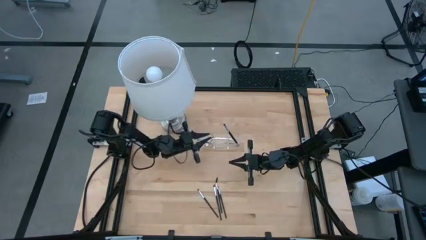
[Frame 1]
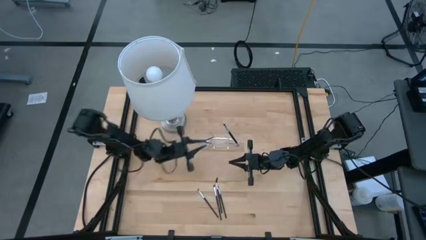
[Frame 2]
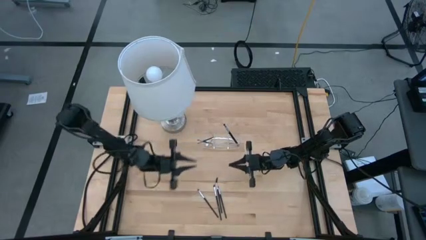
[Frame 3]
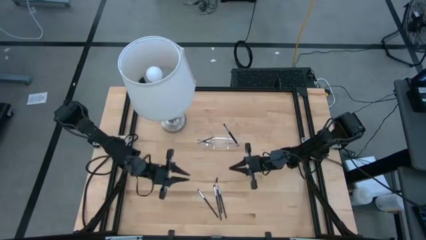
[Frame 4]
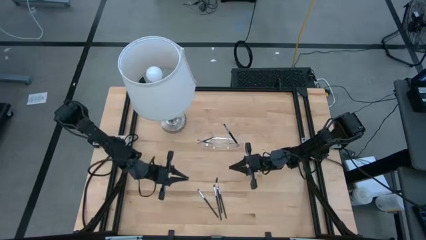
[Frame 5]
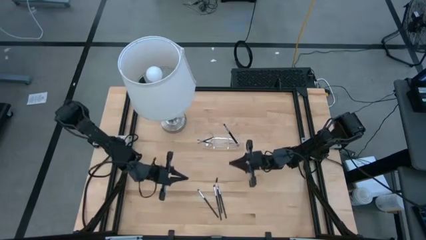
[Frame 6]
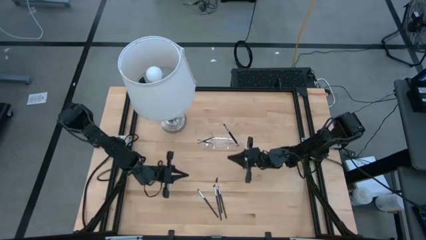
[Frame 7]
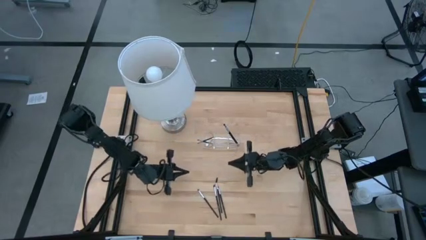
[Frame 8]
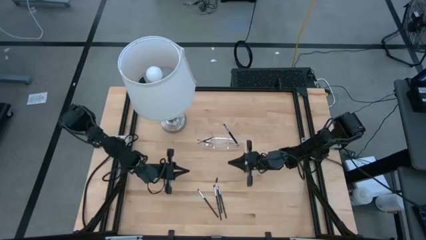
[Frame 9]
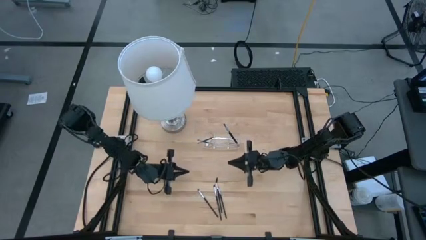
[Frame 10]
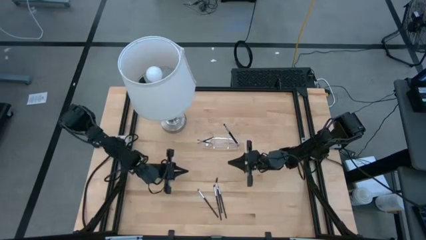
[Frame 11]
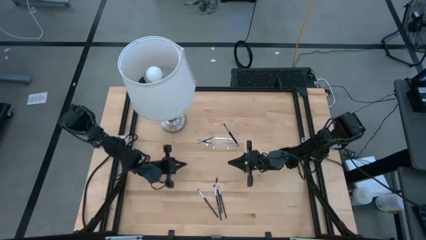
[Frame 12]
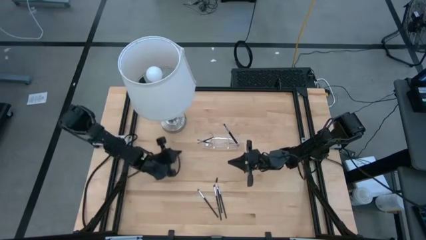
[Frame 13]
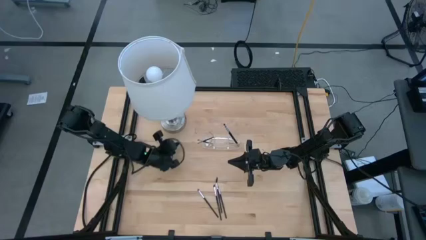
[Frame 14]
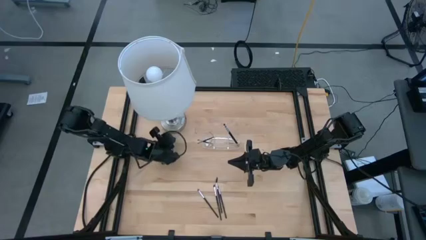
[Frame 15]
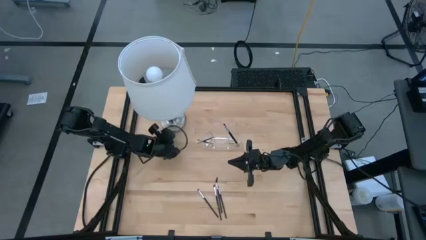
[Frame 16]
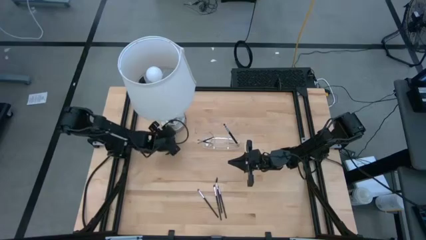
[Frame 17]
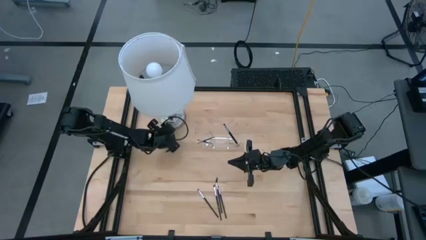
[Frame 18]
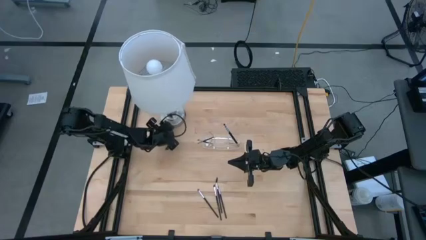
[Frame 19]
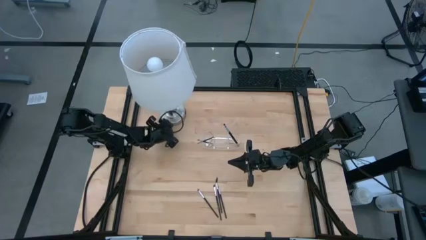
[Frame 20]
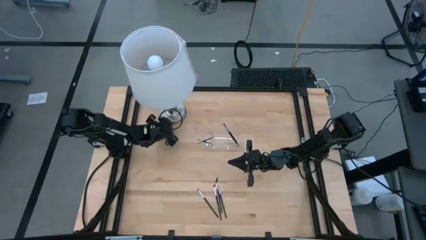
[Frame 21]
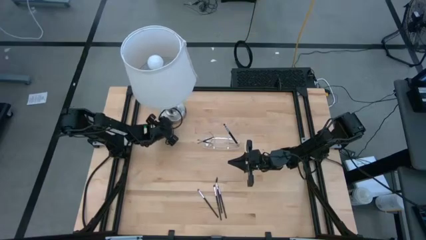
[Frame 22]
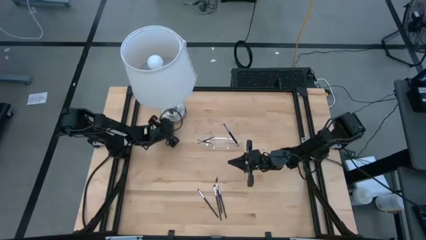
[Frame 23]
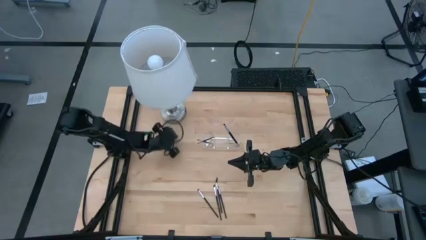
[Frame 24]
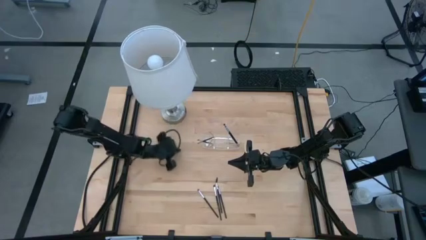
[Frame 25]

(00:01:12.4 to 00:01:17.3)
Task: Sort items
Adjust the lamp on the table

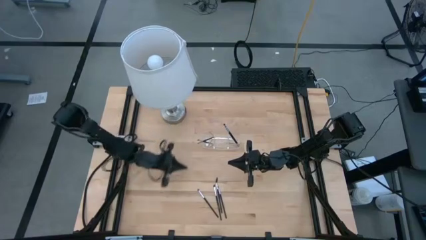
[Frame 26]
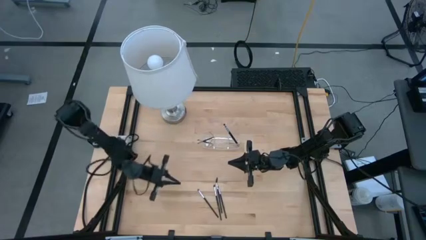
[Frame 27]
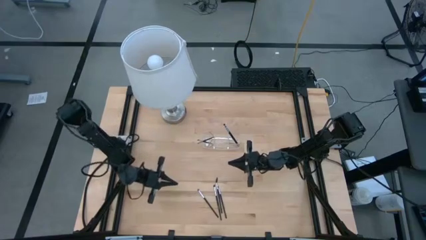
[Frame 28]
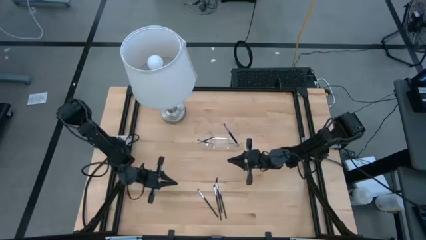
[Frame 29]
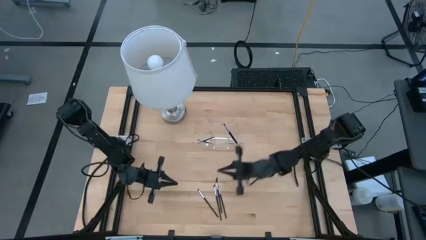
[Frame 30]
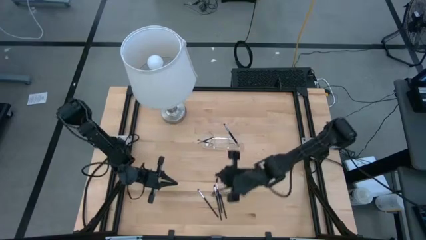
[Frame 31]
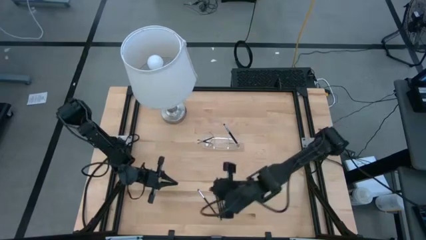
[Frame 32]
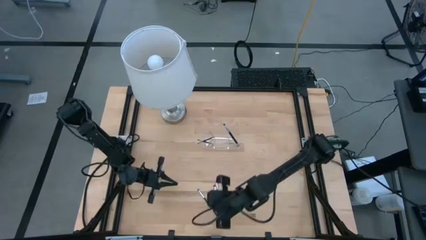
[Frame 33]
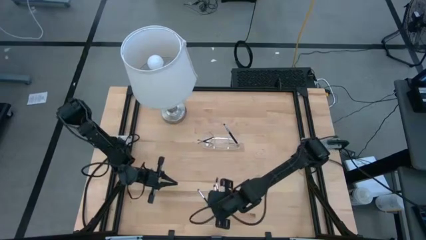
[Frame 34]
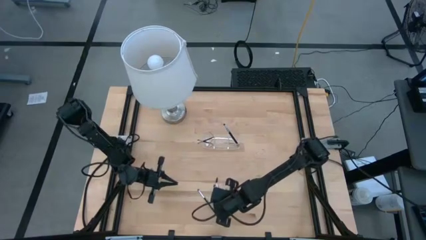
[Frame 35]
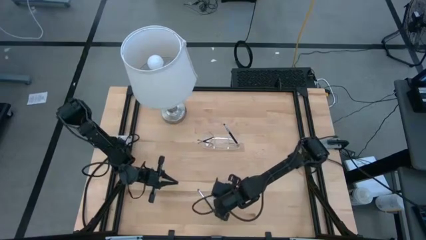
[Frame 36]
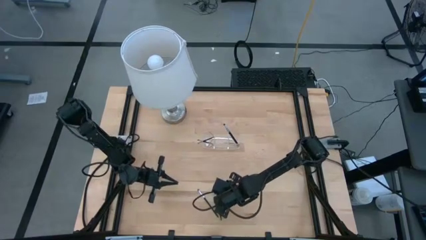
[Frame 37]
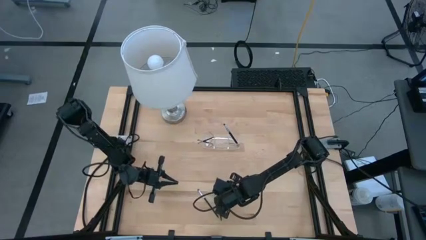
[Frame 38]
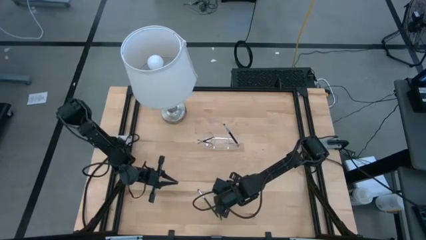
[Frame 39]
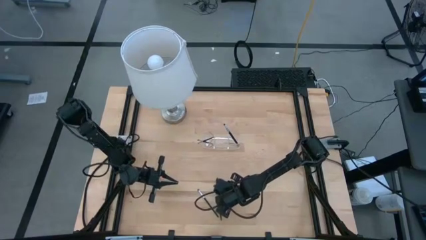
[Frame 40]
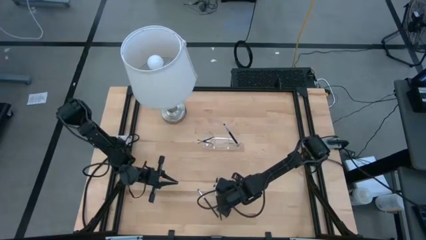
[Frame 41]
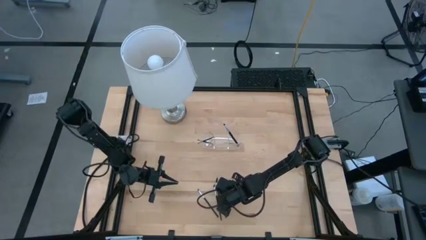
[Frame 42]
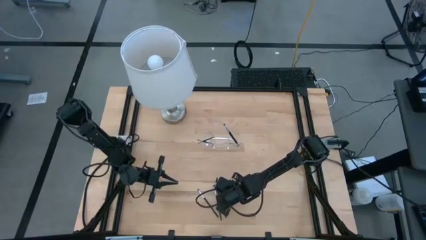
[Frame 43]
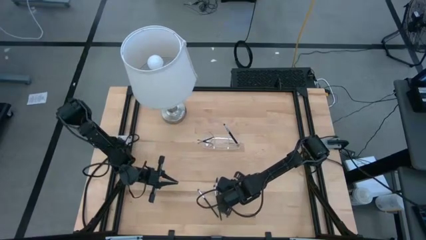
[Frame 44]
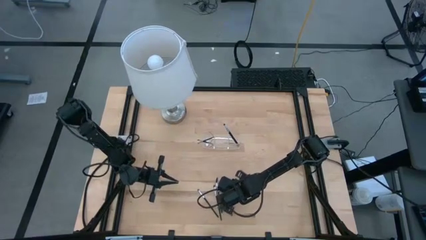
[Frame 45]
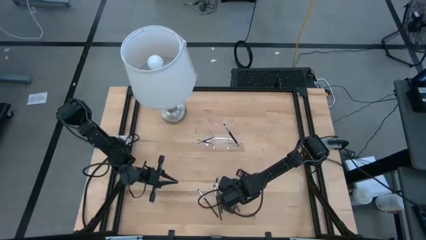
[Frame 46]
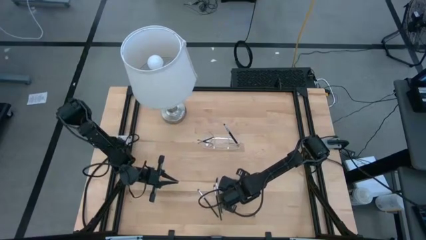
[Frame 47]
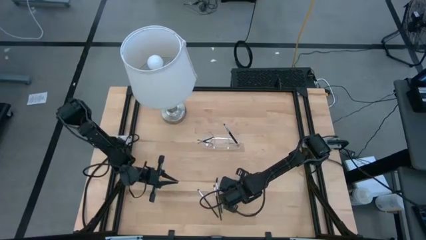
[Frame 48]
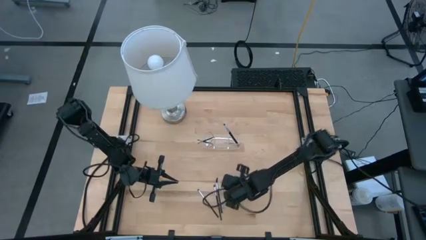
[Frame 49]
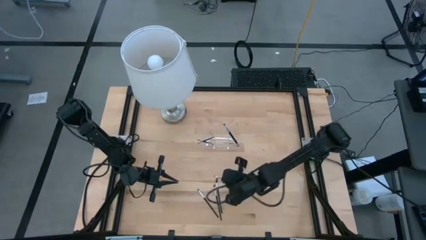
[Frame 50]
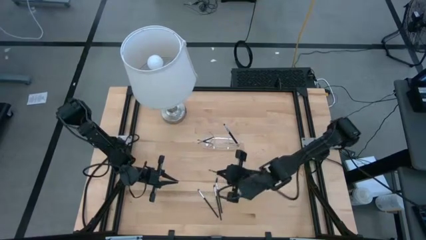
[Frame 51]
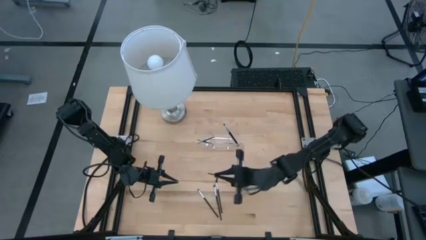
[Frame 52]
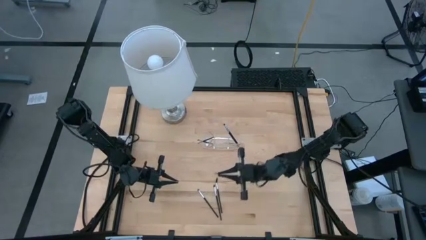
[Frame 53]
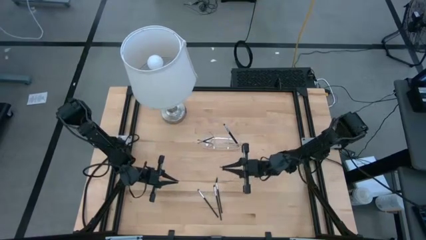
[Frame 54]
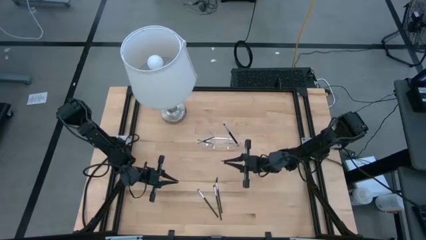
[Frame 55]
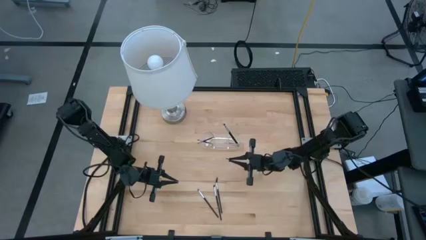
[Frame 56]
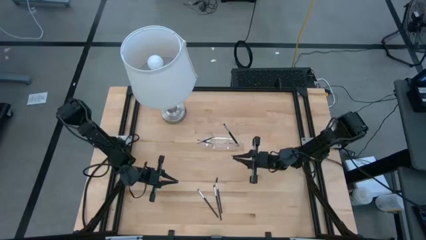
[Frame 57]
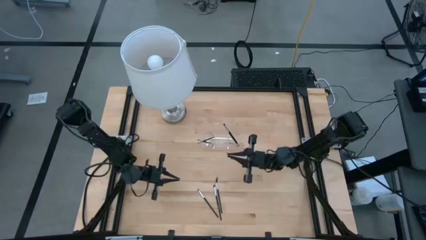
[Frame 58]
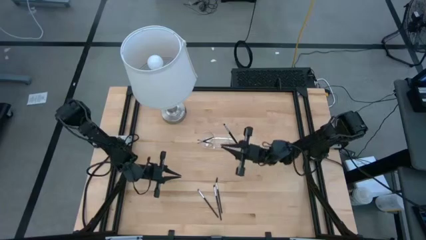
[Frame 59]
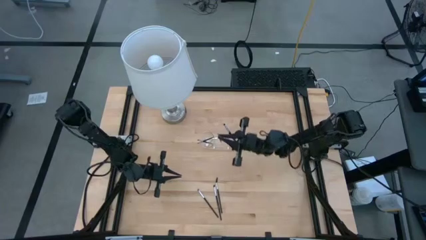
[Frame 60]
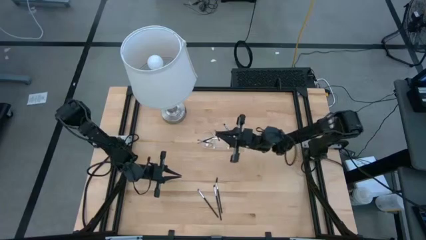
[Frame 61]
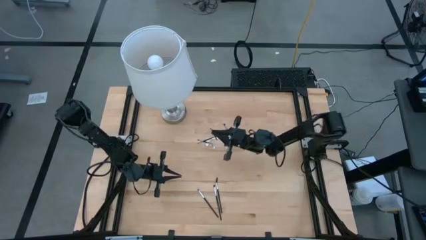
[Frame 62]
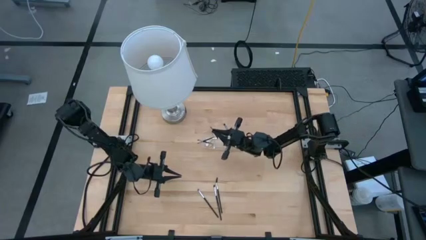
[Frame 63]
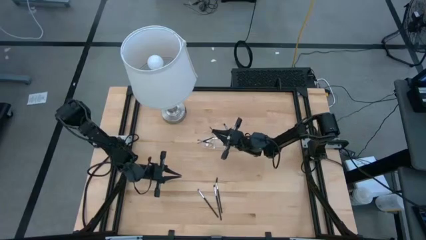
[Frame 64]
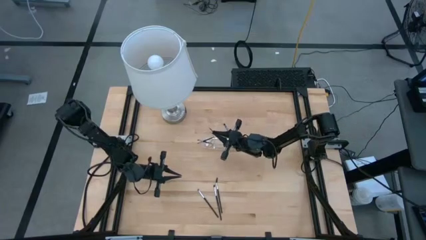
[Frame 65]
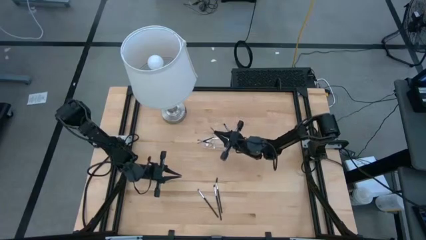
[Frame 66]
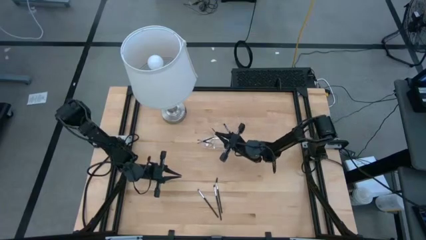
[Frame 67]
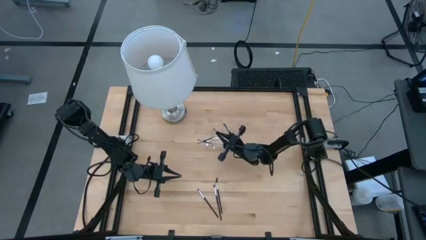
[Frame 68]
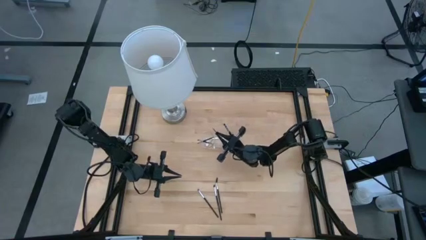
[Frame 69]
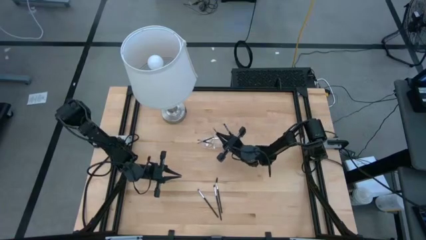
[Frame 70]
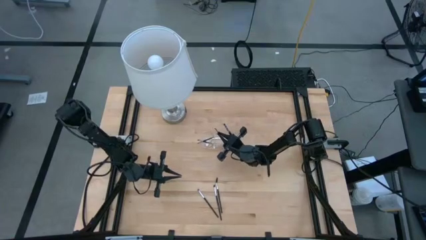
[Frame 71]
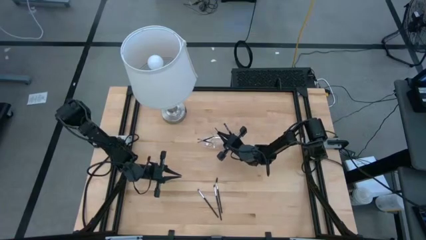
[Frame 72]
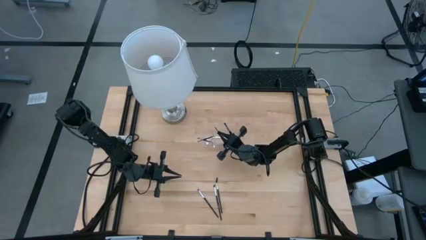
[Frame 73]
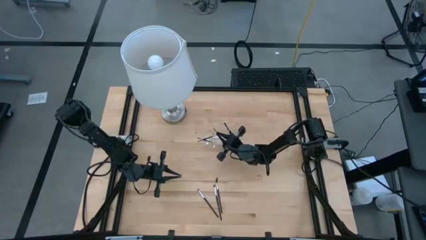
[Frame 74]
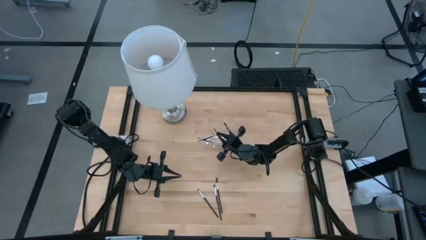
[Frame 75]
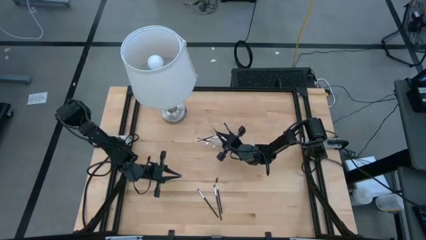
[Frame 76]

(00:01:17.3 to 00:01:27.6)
Put the eyeshadow brush into the transparent organizer

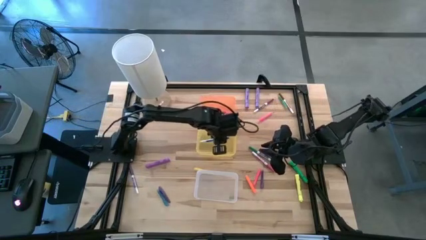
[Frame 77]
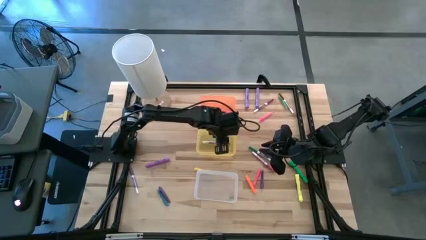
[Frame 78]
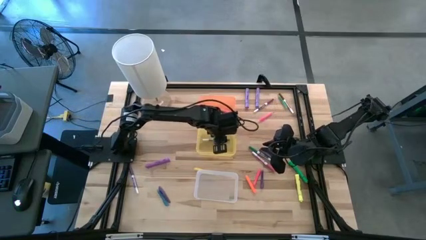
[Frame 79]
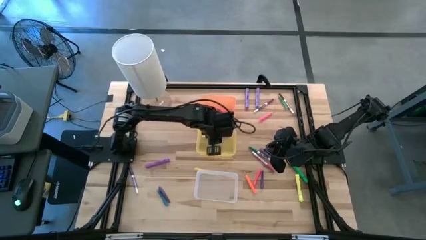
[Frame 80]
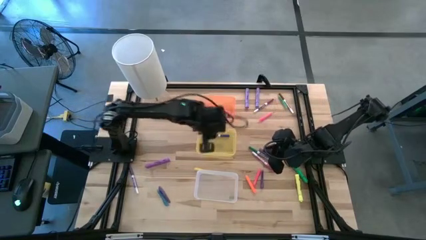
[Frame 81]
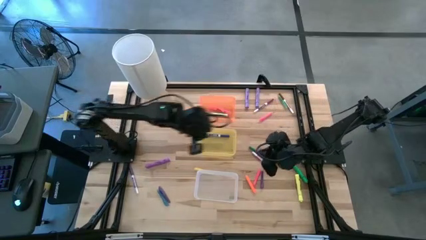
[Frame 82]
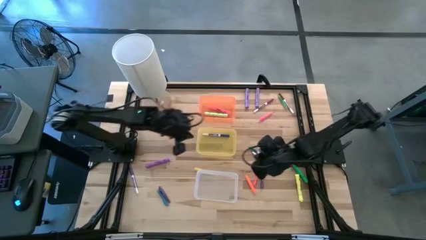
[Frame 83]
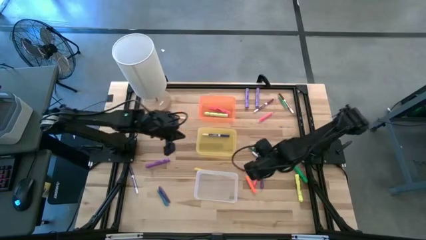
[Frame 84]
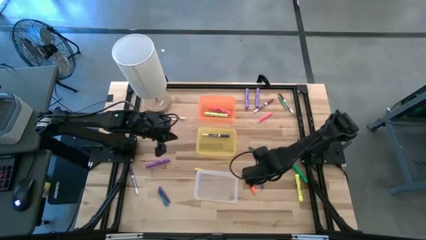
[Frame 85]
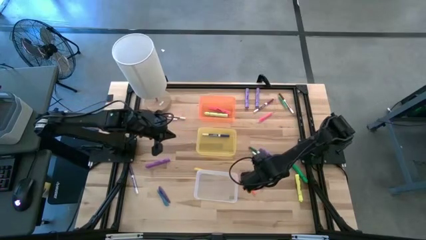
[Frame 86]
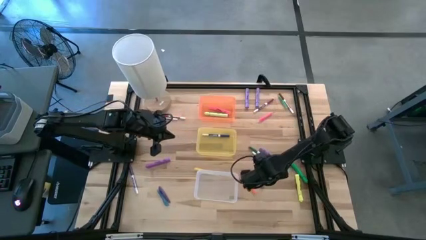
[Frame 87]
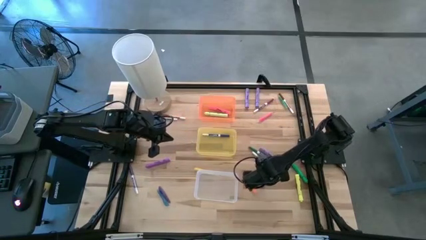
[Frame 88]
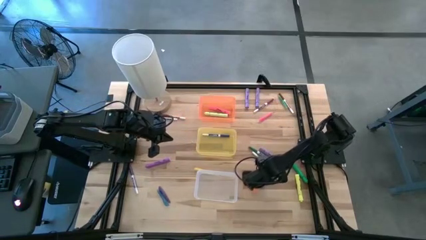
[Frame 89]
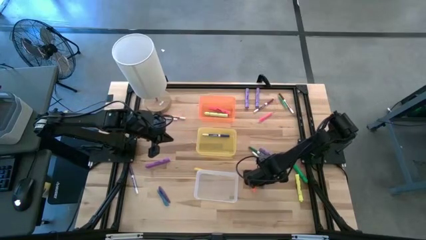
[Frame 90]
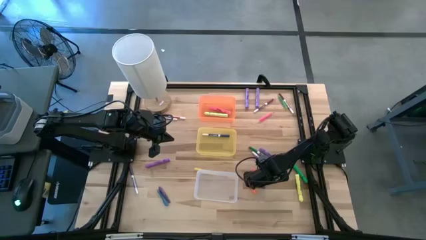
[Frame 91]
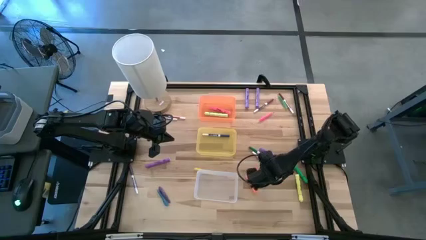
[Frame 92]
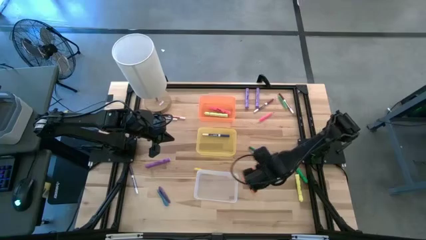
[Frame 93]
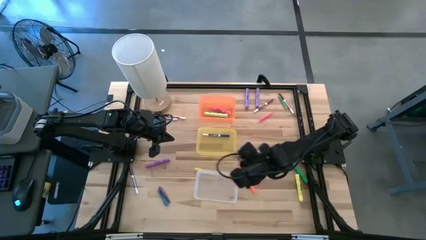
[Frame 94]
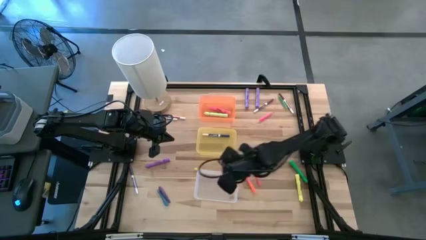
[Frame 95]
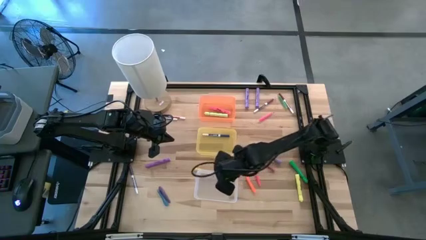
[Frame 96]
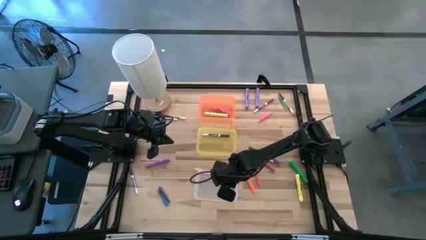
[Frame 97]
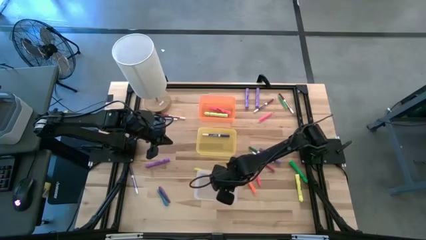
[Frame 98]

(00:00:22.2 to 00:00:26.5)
Task: Pick & Place Markers
Put the right purple pen into the white bin
